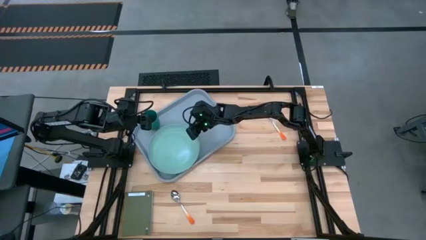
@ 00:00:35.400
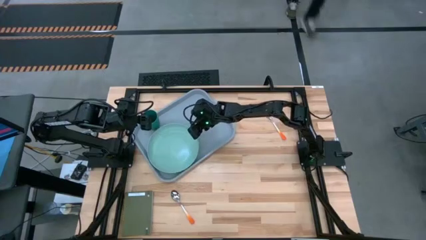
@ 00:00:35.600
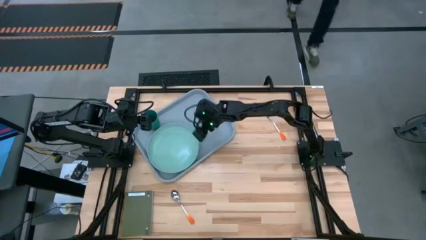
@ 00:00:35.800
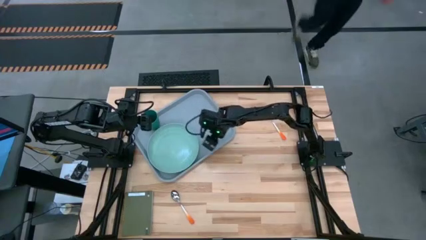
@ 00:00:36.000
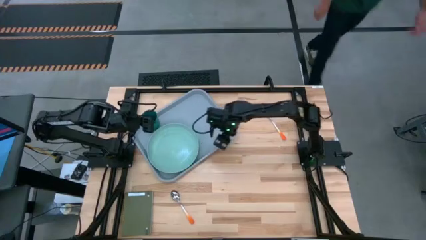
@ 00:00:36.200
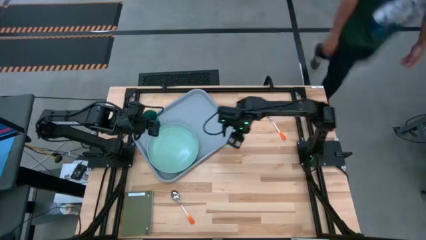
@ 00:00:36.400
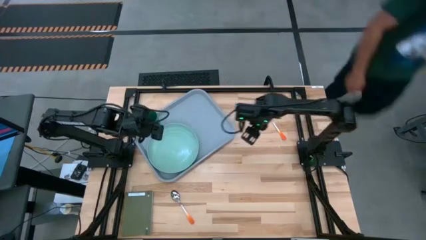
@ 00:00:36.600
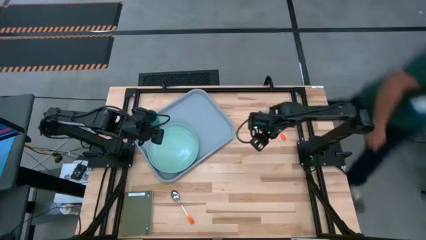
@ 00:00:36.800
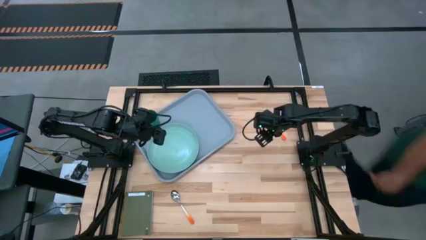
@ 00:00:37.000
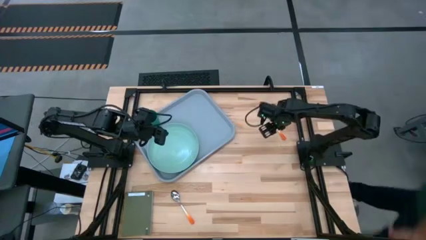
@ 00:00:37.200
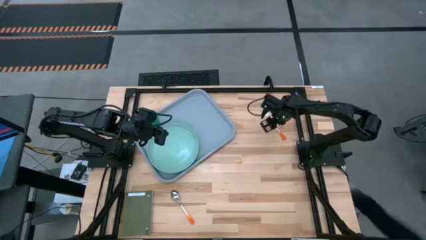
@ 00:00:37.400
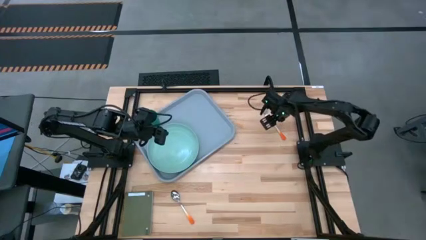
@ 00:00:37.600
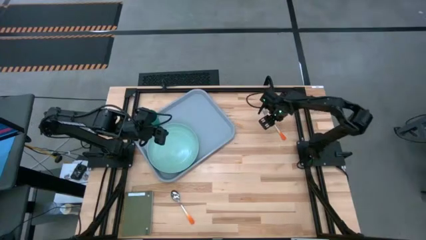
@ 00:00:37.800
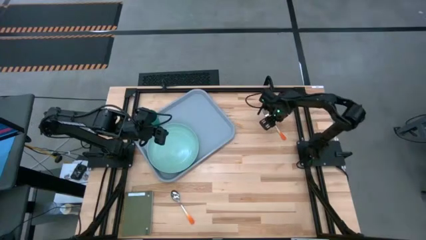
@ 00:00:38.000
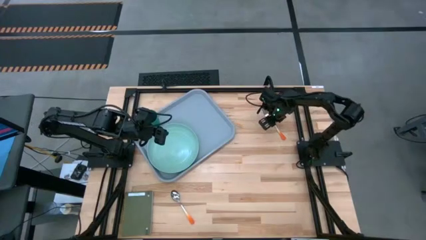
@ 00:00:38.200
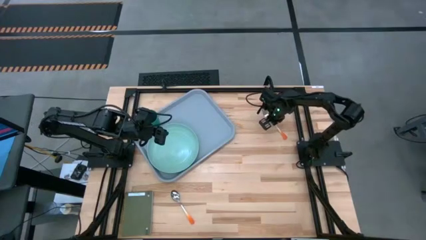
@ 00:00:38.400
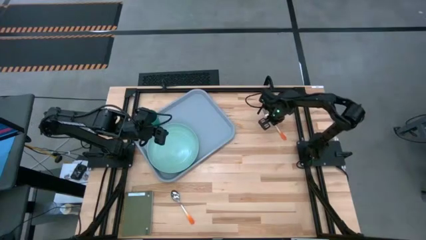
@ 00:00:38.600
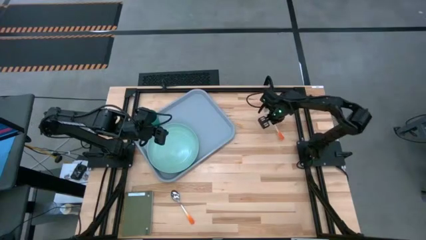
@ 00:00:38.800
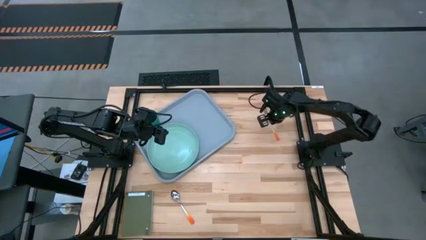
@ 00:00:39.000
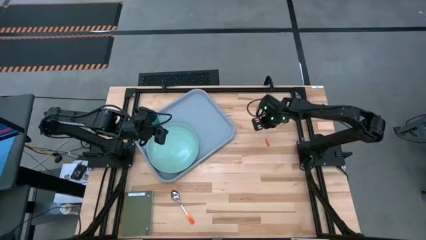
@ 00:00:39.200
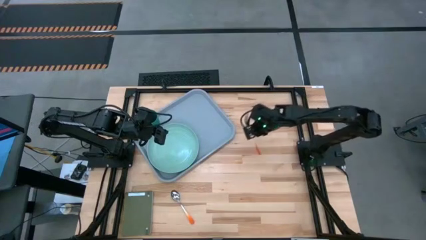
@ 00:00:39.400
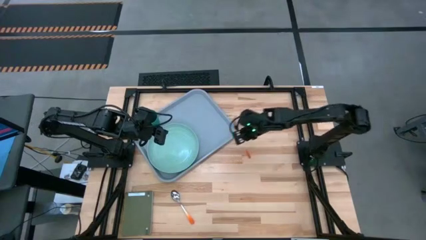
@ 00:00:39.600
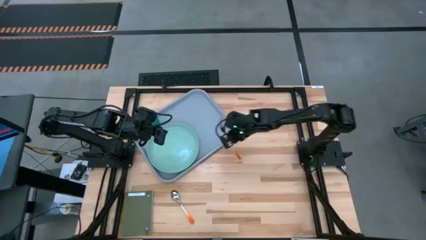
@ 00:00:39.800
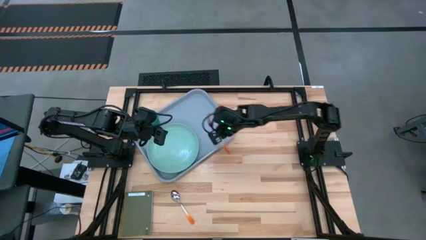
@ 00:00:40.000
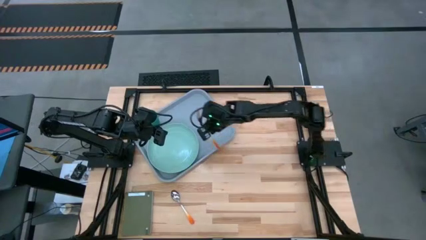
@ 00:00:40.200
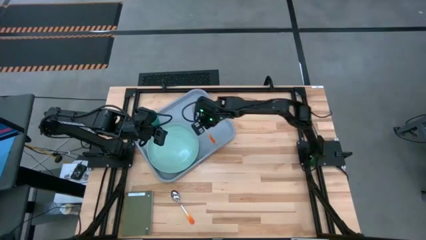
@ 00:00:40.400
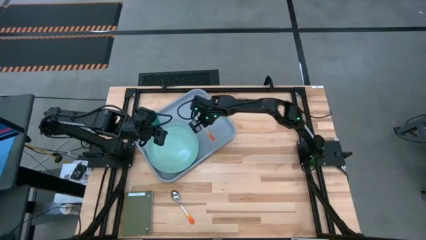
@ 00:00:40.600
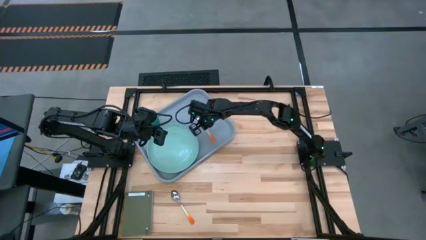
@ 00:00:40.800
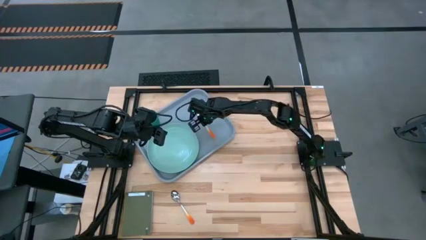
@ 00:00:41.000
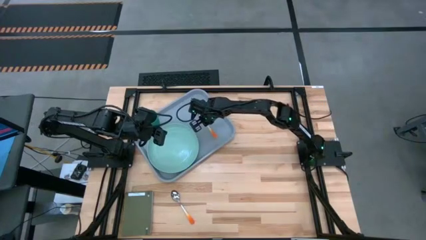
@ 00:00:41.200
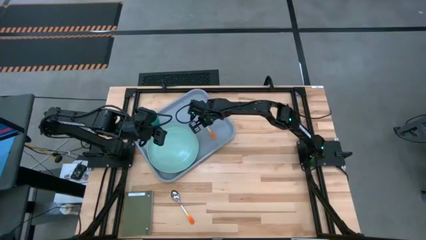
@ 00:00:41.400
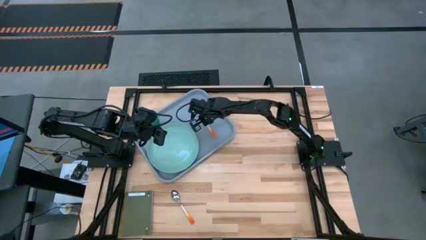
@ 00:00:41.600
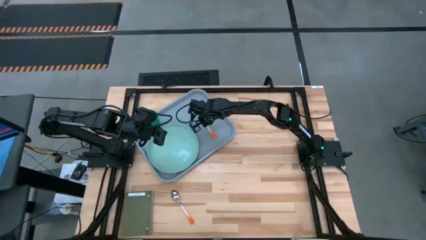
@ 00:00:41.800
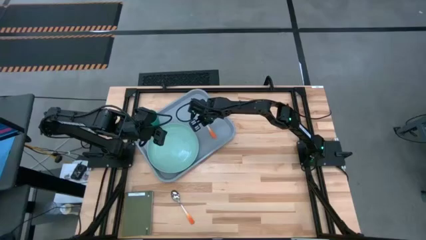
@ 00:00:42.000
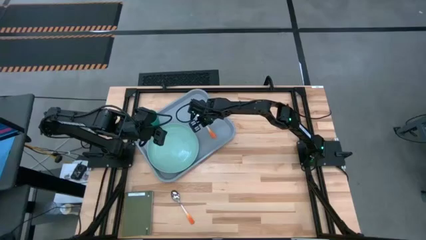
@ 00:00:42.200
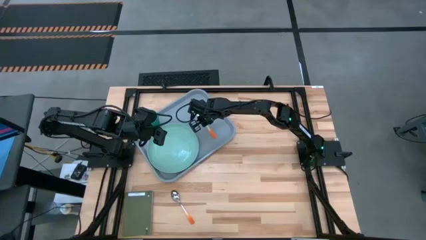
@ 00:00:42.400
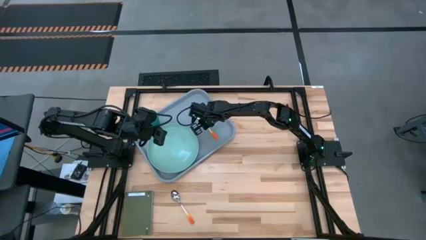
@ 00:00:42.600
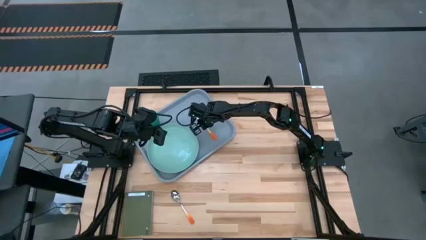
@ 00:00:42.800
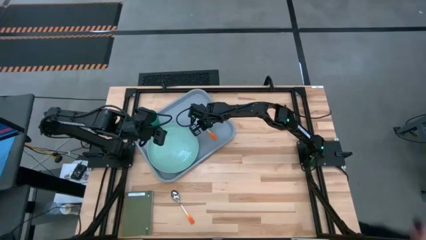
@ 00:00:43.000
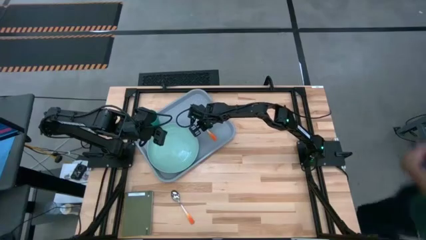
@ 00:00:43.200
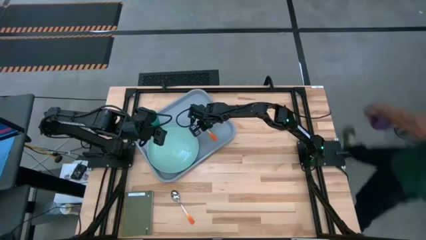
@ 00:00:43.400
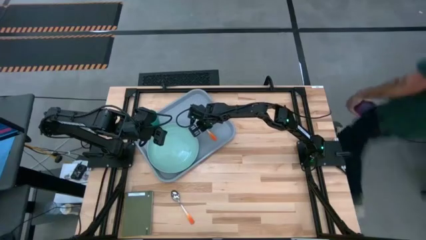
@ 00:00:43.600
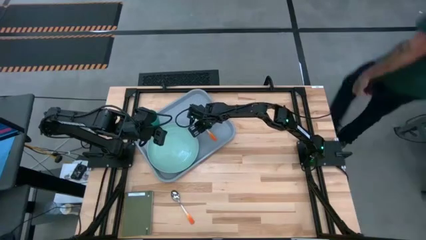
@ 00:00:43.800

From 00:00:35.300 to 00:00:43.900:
Task: Pick and place plate/cup/fork/spoon on tray
Put the orange fork on the gray tray to the right of the plate

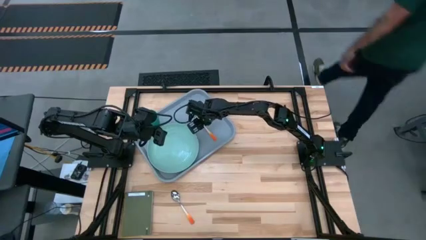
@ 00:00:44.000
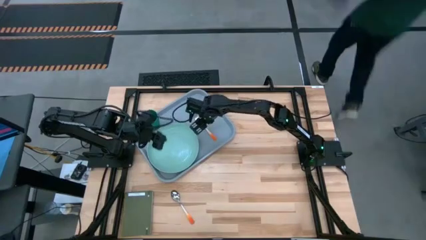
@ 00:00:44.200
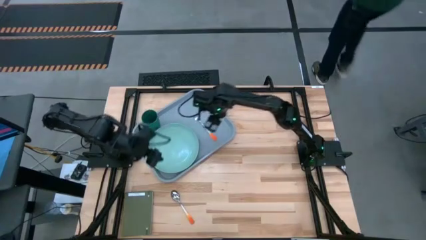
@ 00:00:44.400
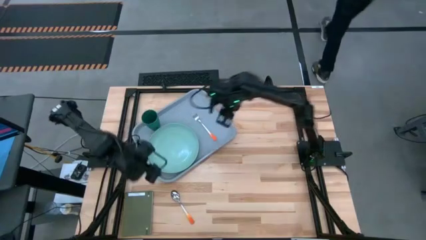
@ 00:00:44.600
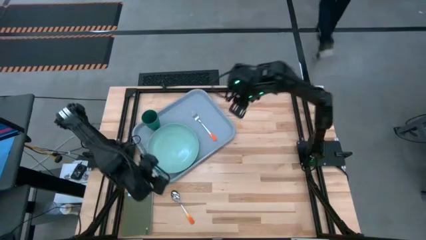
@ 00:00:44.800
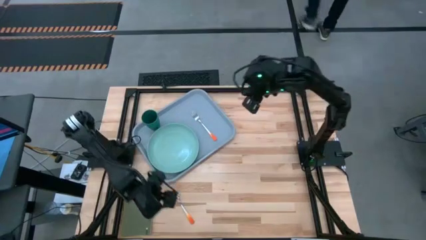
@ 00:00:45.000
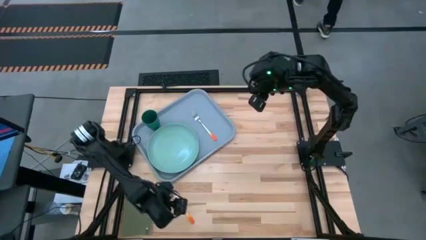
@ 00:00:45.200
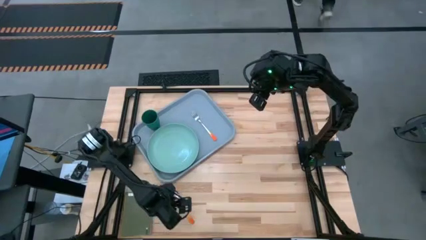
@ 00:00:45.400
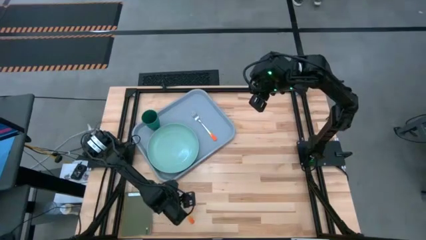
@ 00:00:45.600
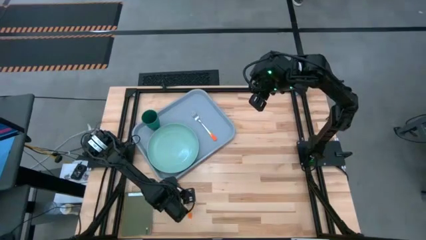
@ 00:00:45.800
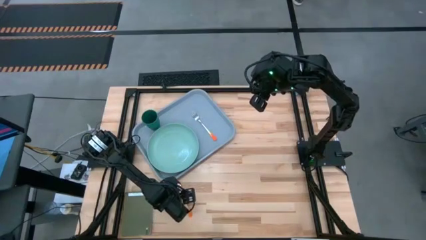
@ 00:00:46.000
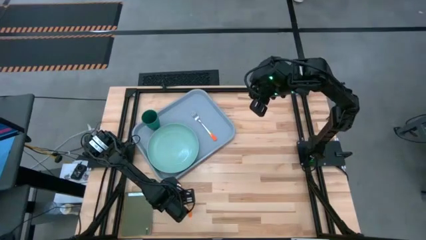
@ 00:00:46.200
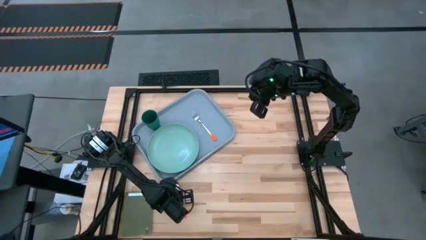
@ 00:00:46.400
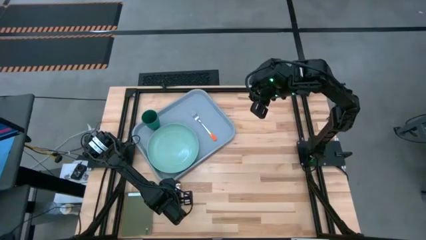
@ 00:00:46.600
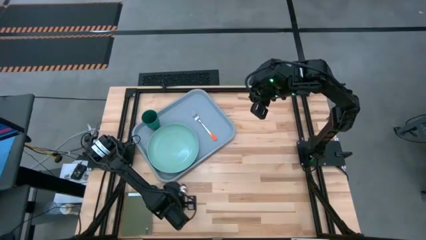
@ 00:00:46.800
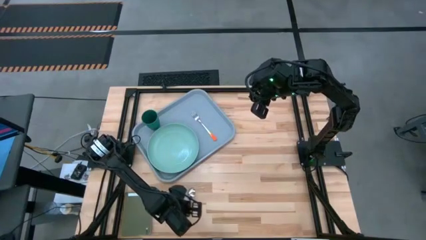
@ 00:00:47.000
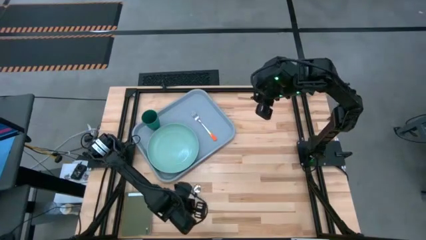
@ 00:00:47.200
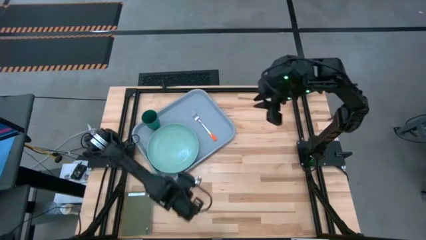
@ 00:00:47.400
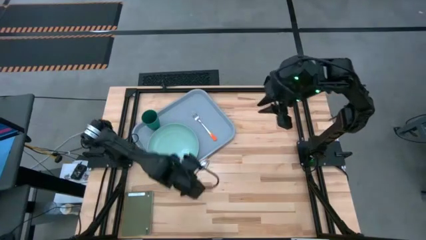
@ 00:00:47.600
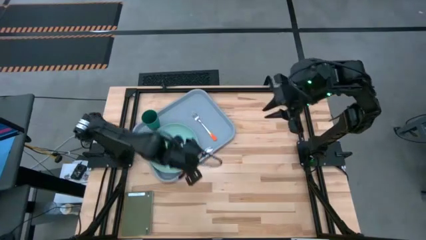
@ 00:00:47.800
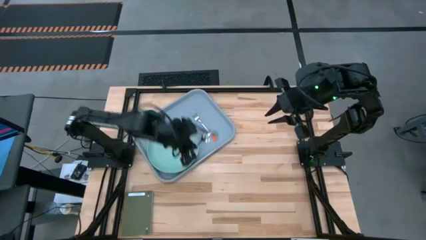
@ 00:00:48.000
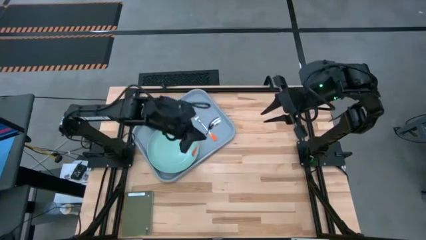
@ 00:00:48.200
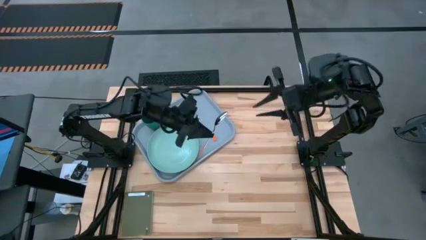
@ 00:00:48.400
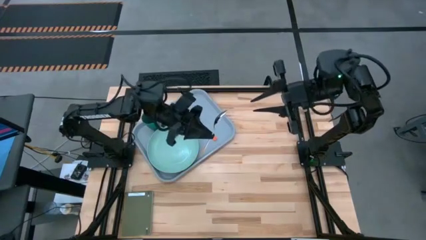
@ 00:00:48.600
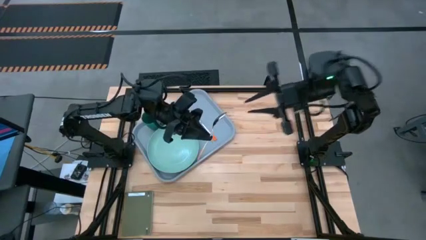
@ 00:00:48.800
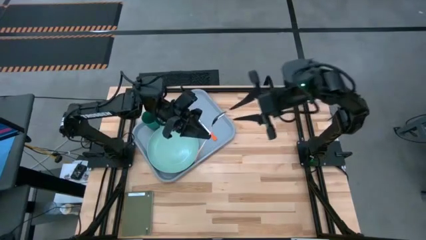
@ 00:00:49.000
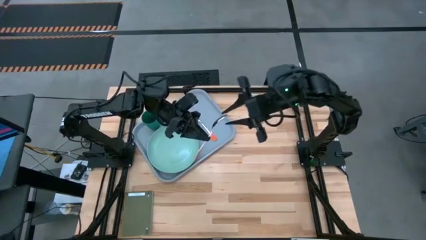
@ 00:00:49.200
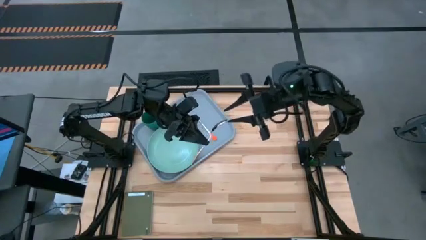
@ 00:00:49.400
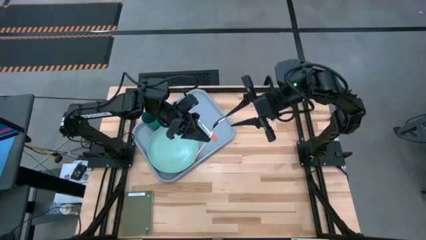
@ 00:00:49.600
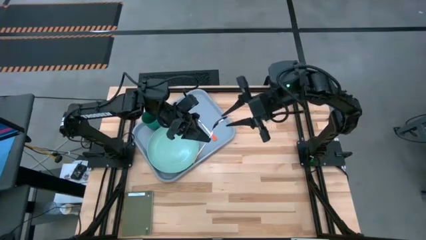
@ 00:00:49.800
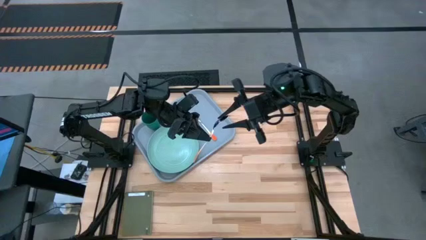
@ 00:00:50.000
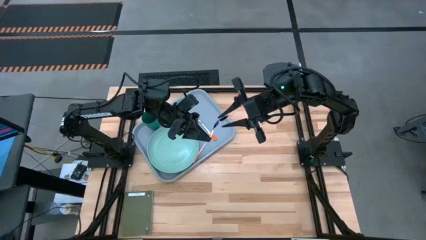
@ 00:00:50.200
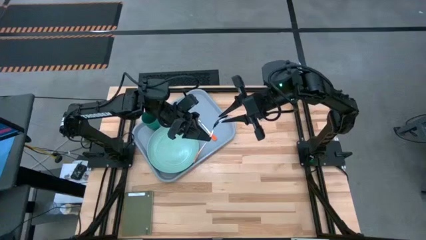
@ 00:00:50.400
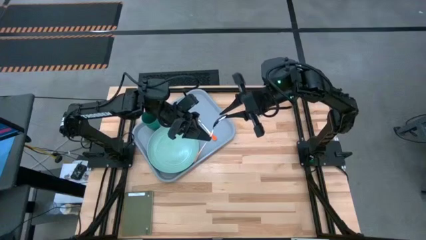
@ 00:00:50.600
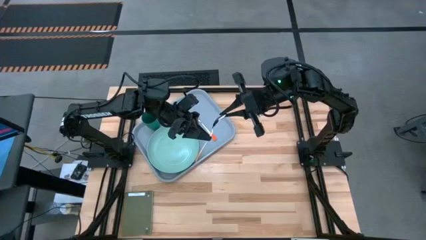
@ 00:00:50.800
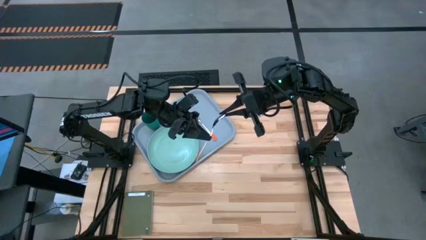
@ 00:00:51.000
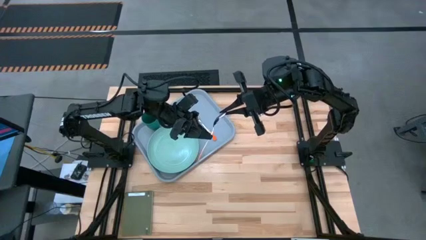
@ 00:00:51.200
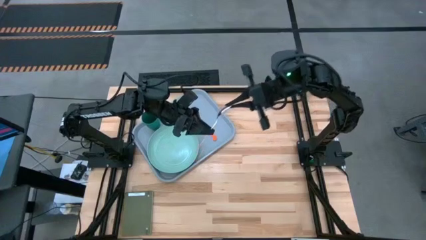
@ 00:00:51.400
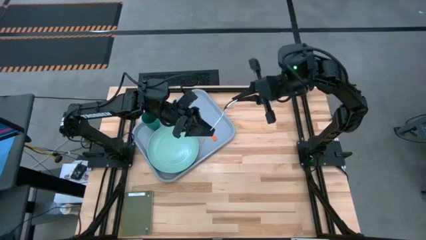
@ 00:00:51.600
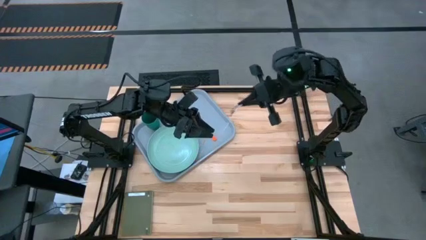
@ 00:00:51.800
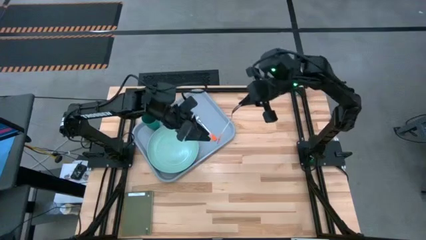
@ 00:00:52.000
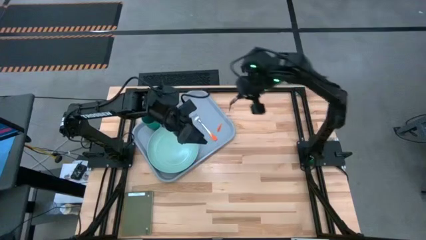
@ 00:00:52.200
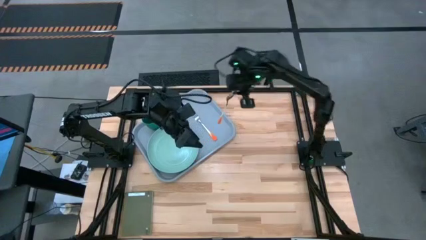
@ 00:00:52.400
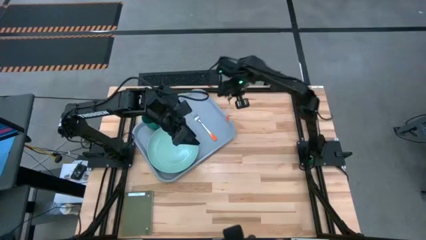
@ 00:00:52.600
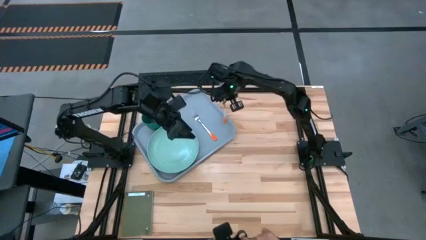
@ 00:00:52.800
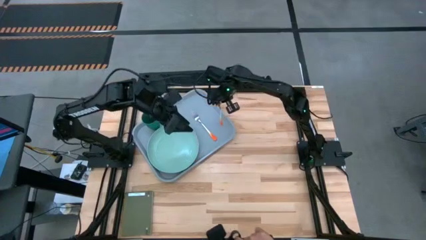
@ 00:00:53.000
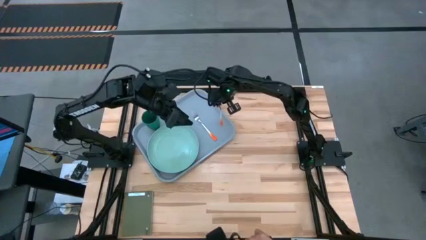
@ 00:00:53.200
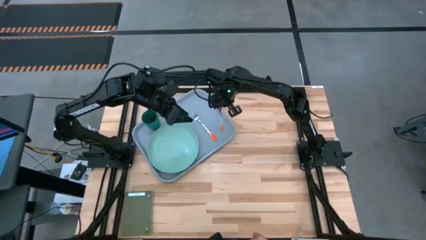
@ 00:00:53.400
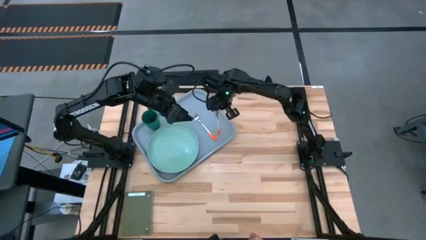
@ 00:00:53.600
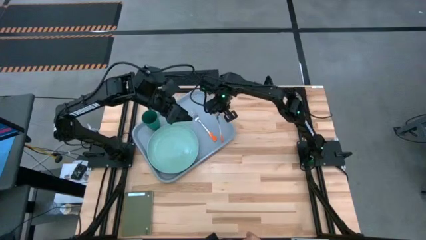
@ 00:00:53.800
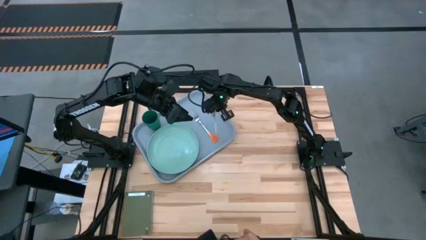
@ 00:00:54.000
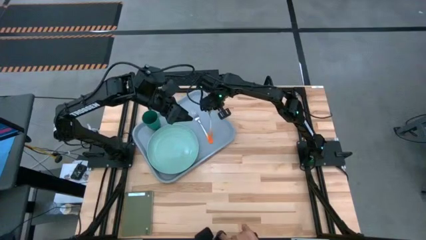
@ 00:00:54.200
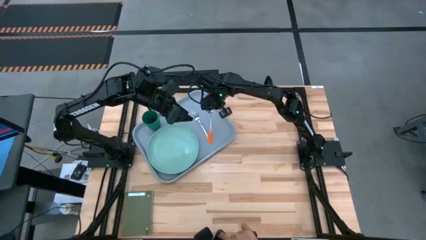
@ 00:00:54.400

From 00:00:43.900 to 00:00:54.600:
Put the spoon on the gray tray to the right of the fork
